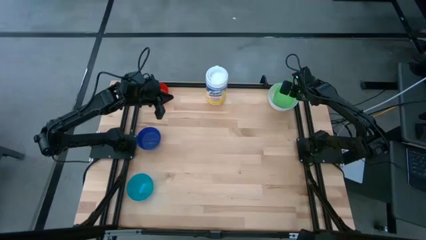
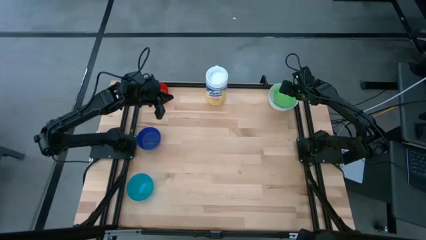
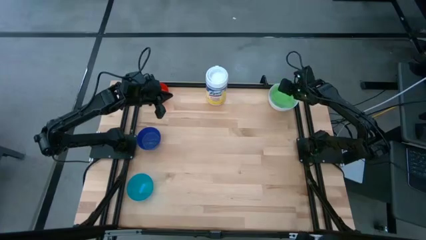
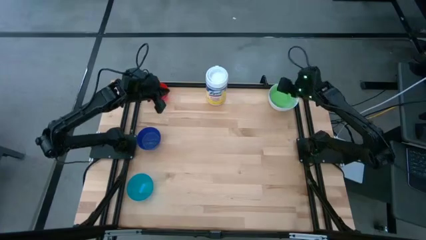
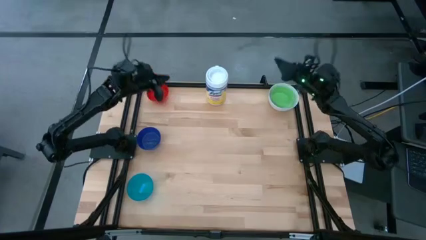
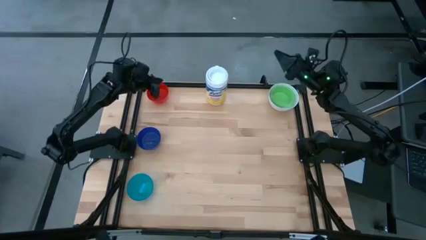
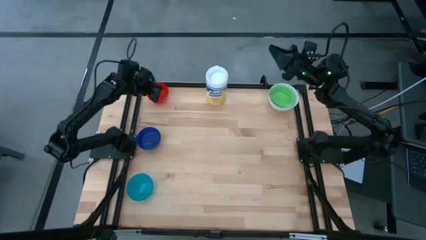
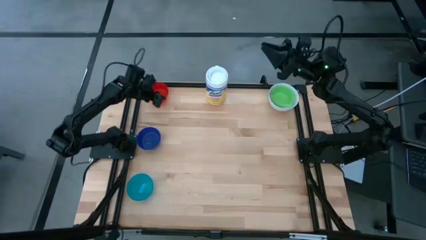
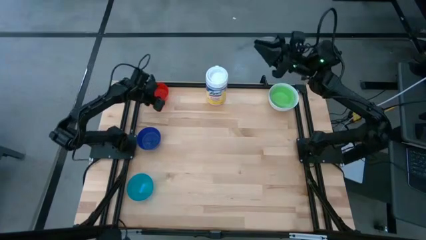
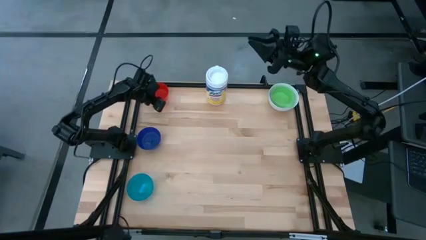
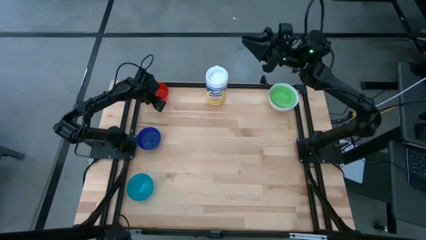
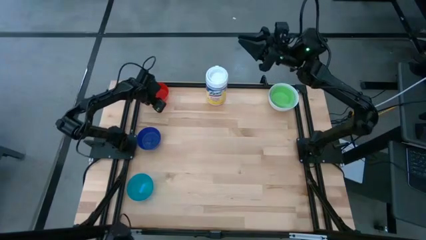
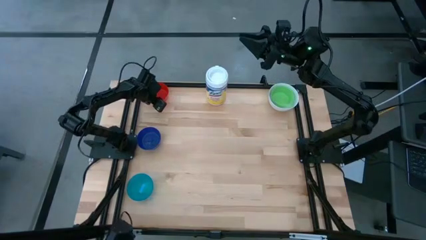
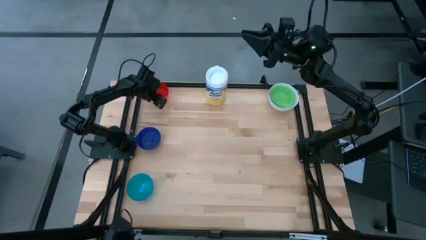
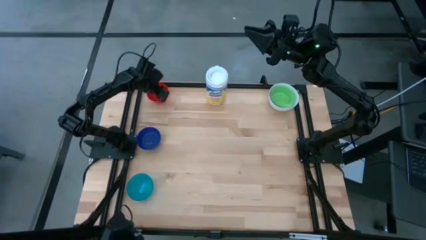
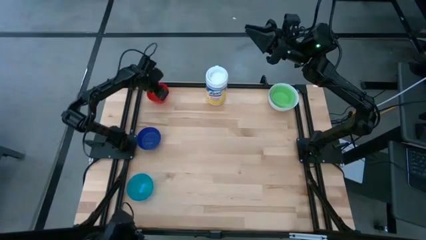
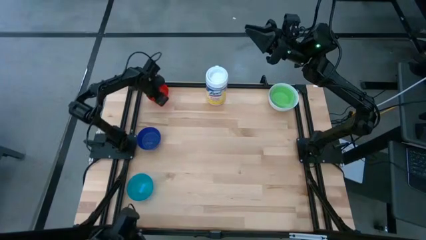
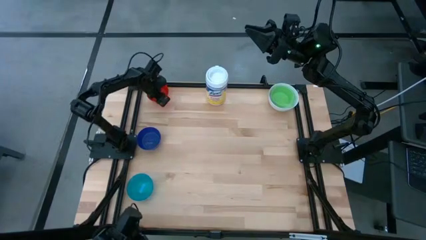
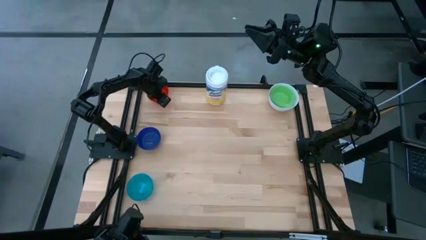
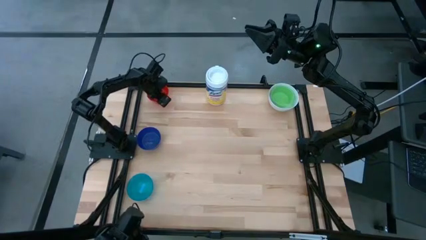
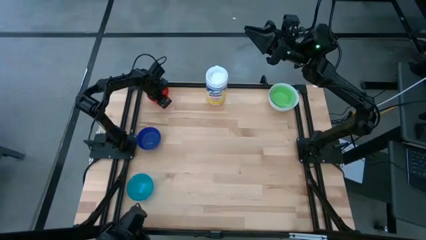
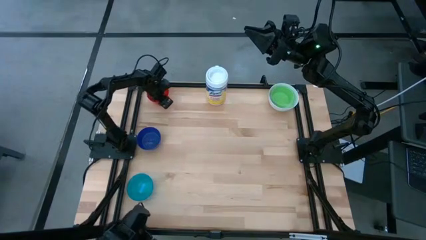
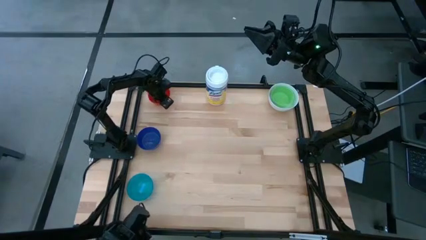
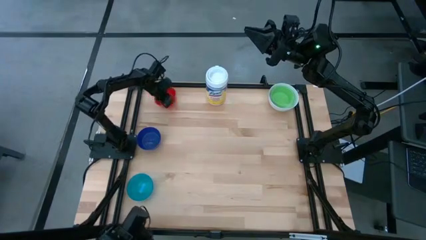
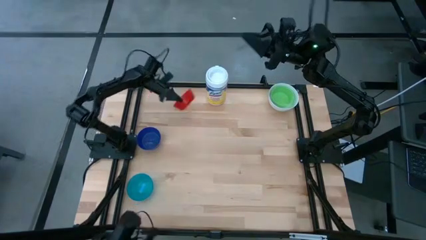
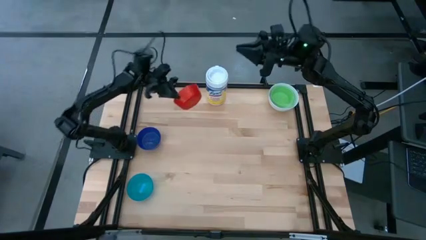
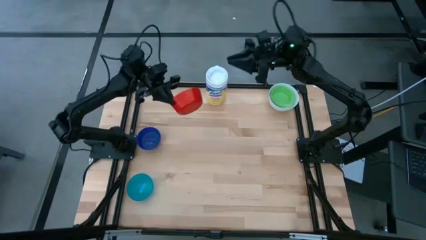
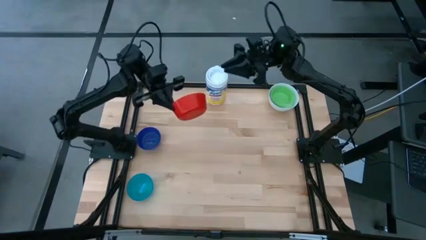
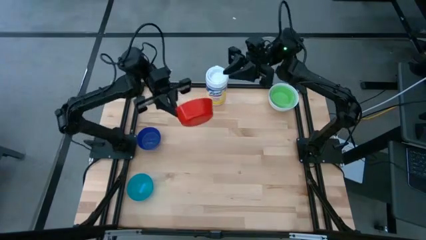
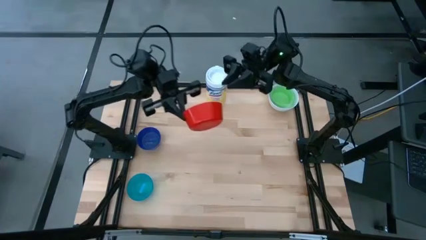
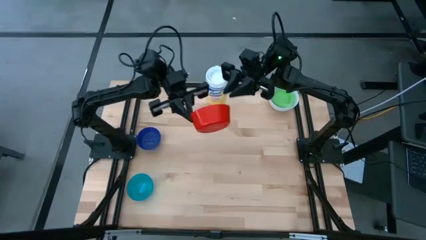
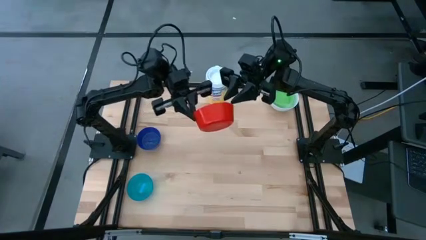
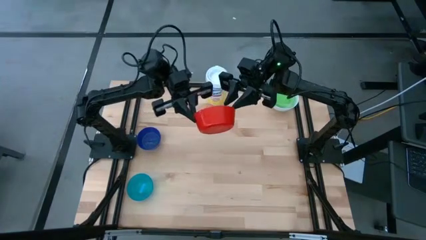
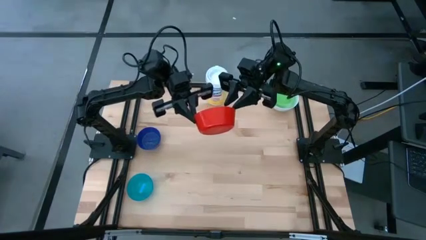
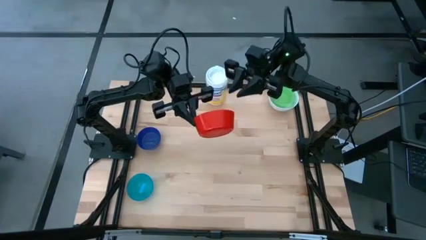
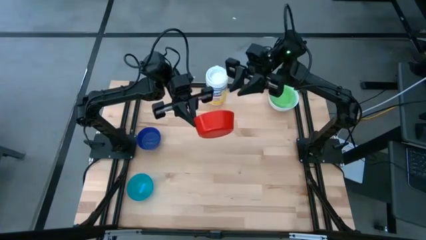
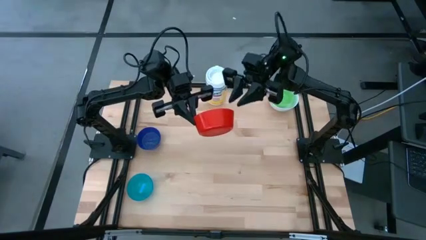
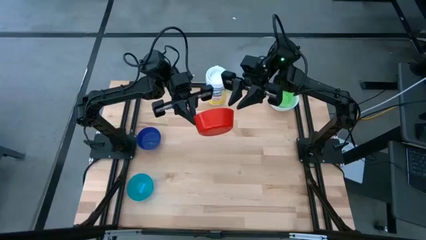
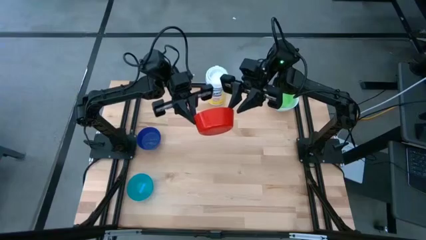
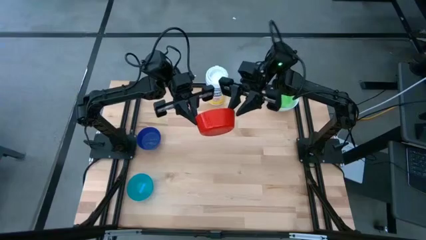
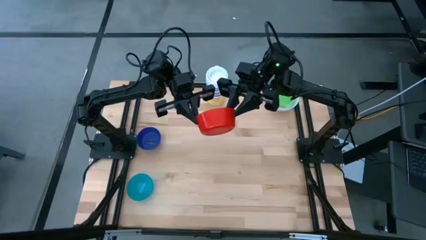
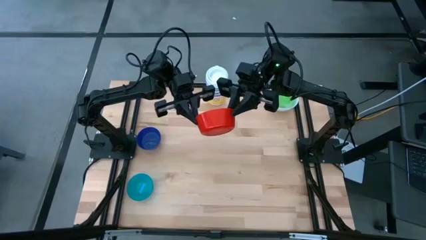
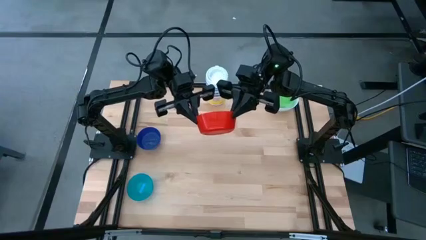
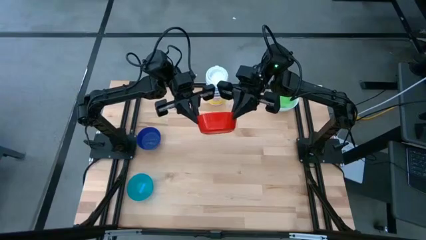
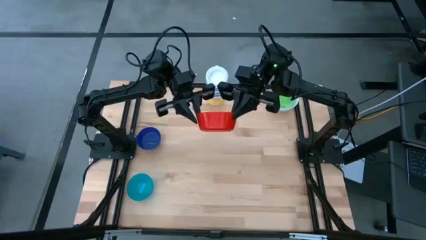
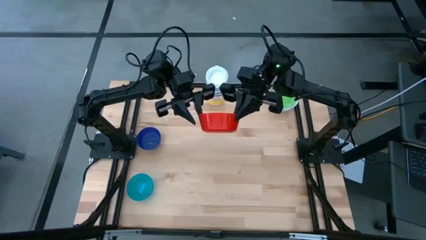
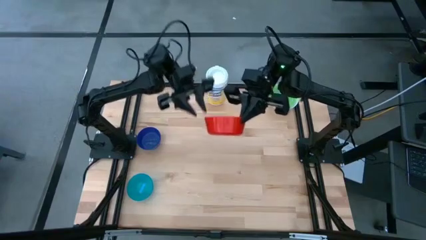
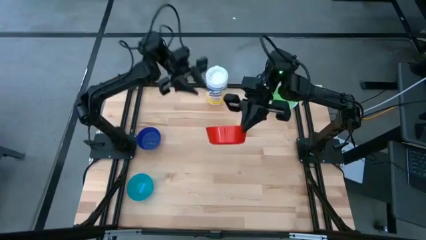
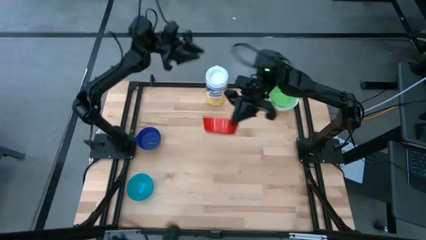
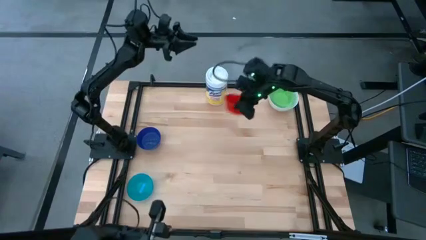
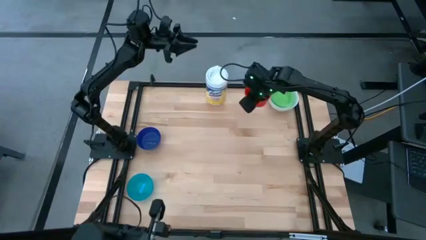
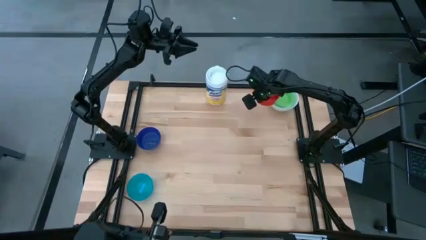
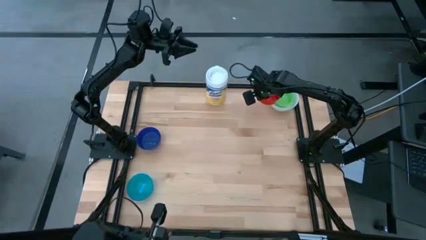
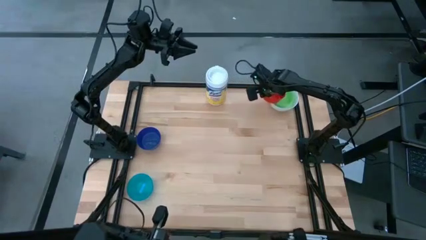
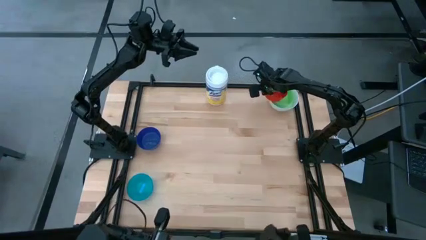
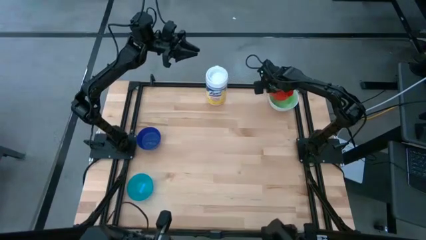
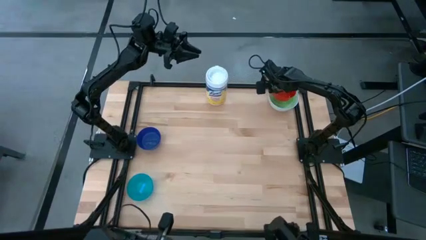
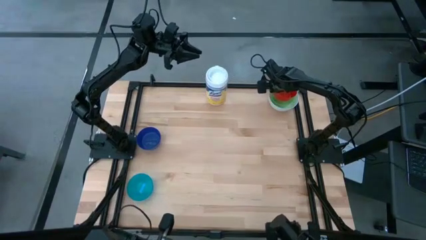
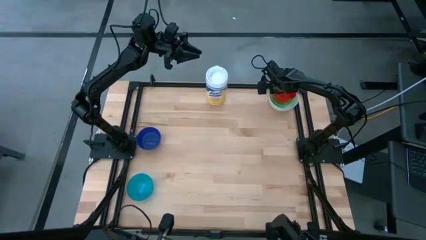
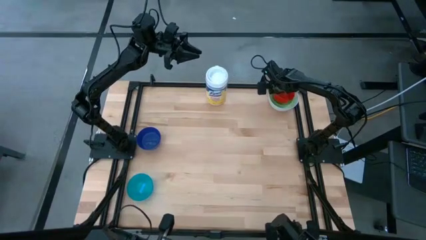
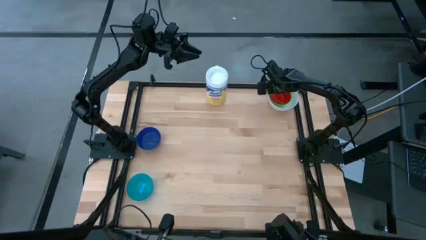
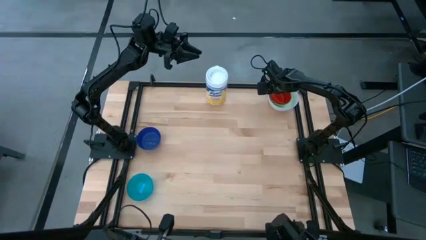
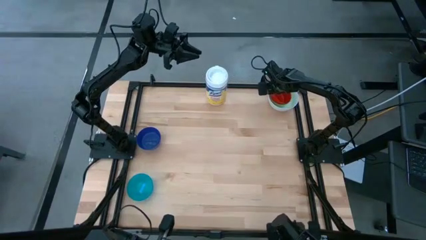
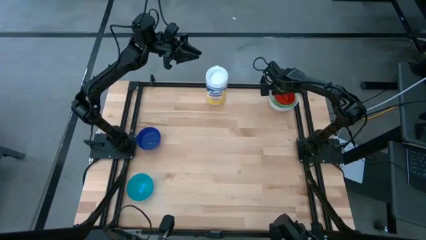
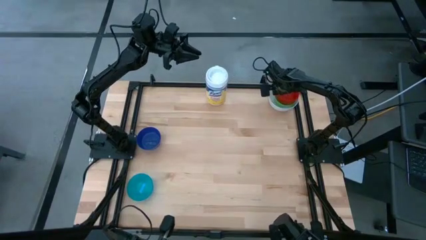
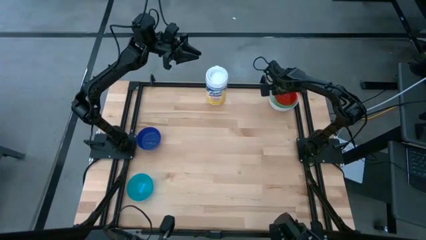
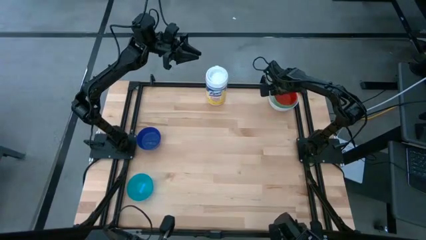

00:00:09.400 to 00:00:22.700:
Stack the red bowl on top of the green bowl
